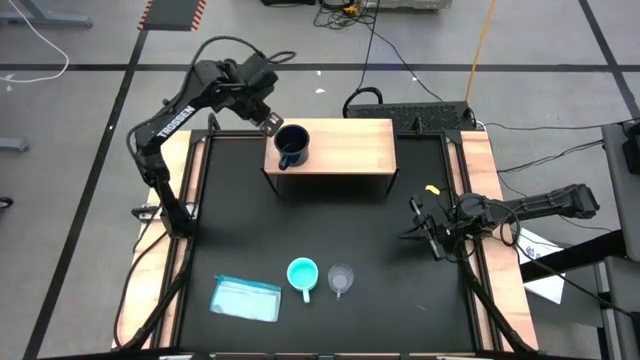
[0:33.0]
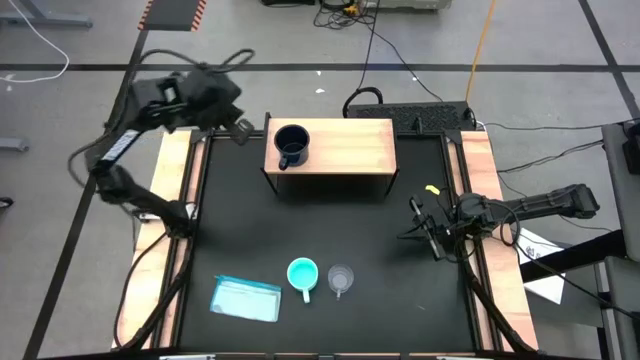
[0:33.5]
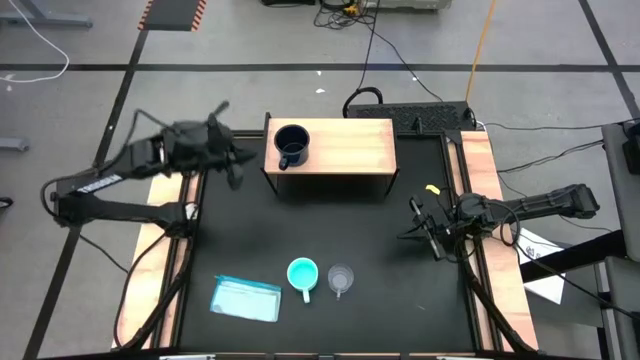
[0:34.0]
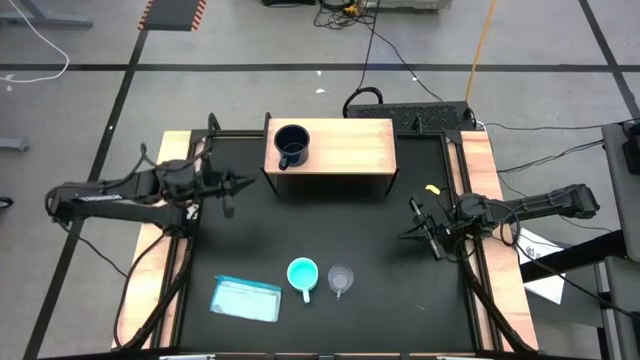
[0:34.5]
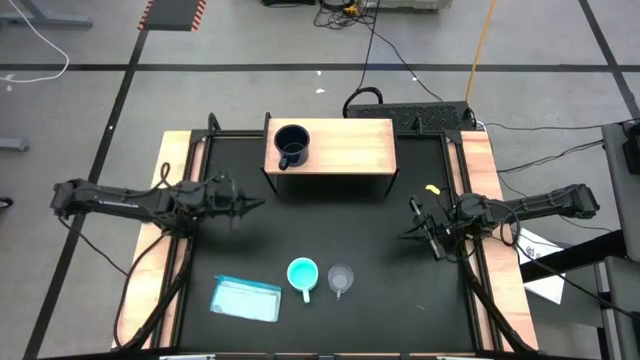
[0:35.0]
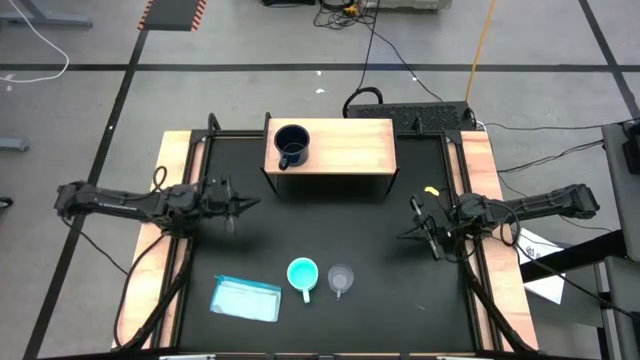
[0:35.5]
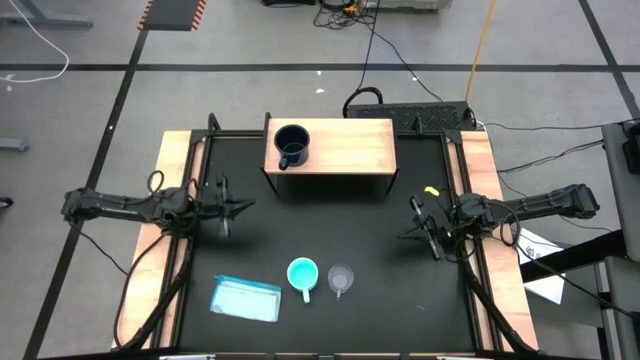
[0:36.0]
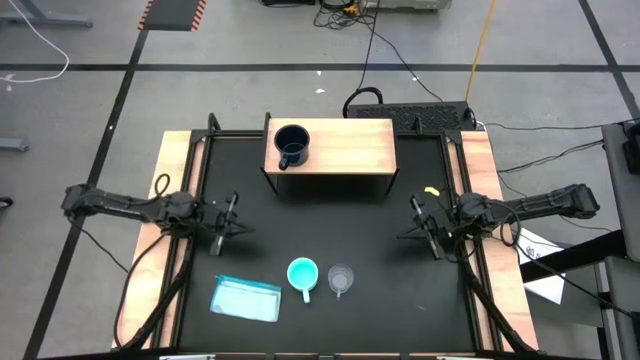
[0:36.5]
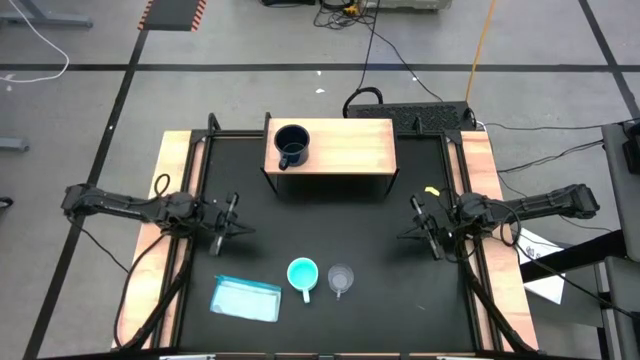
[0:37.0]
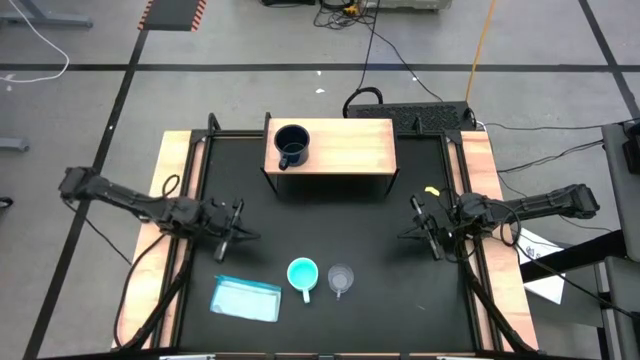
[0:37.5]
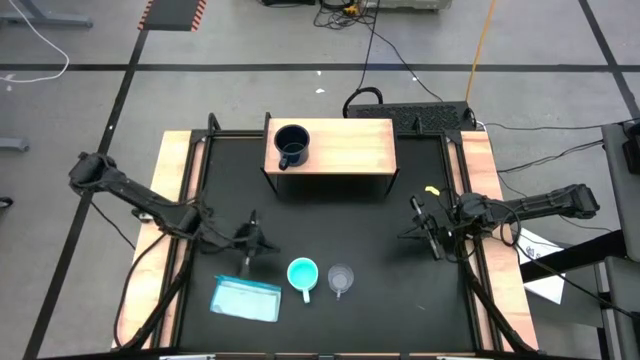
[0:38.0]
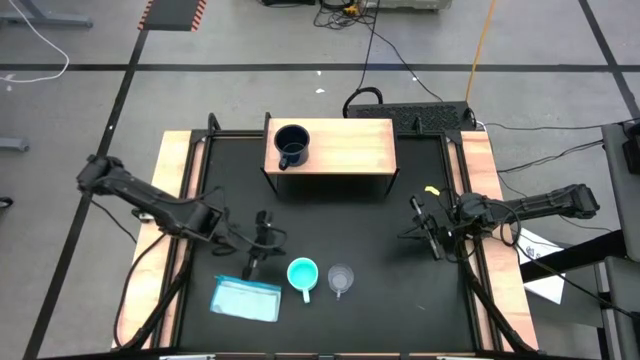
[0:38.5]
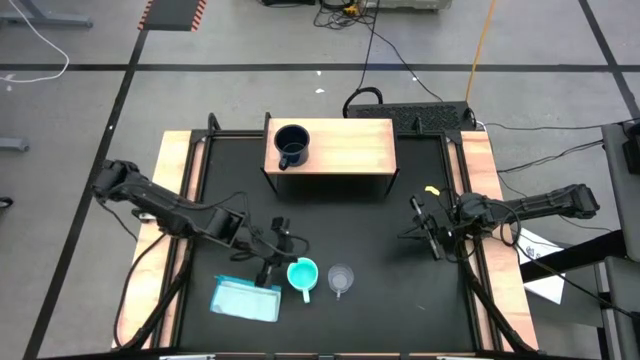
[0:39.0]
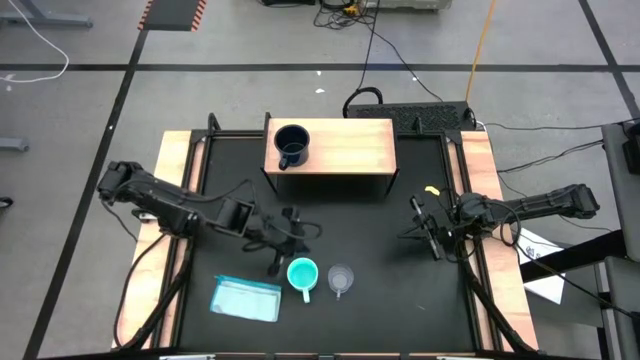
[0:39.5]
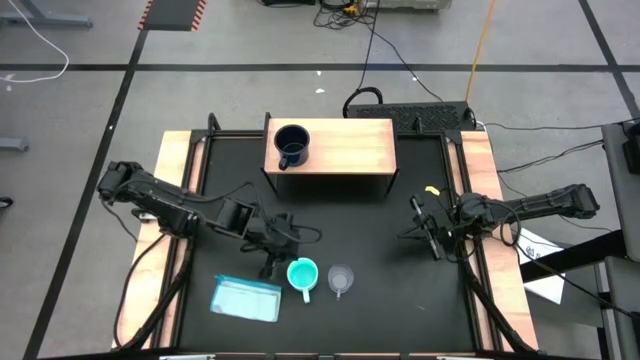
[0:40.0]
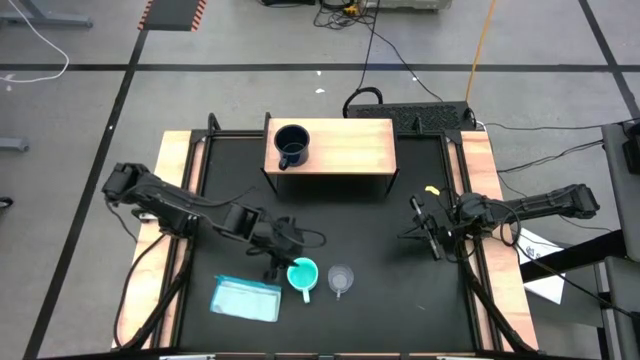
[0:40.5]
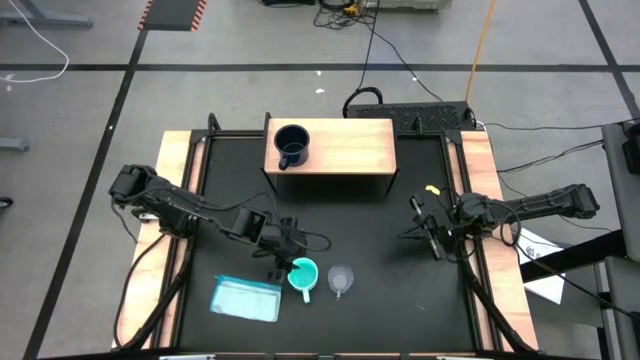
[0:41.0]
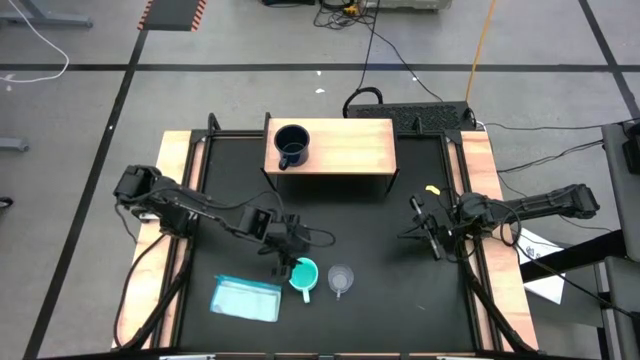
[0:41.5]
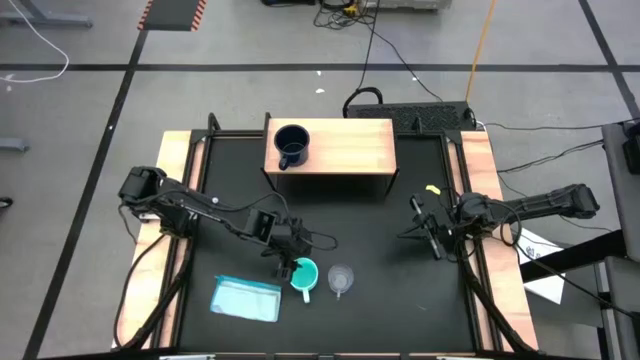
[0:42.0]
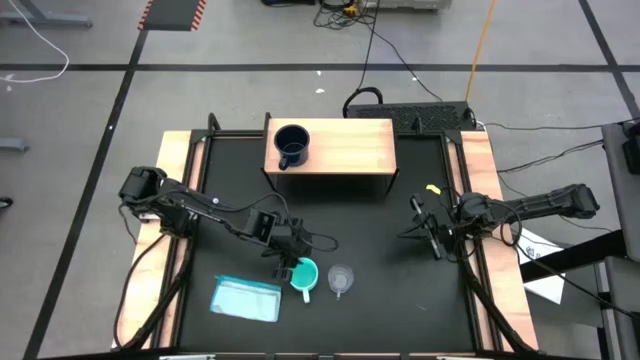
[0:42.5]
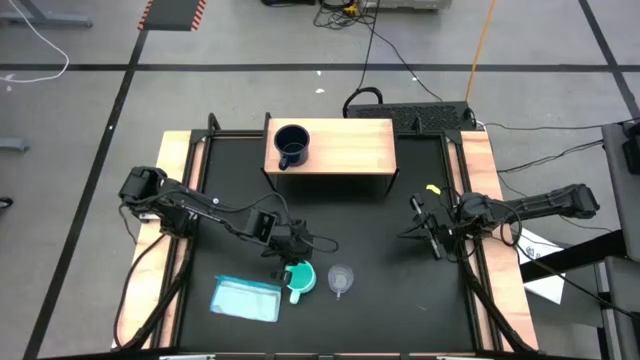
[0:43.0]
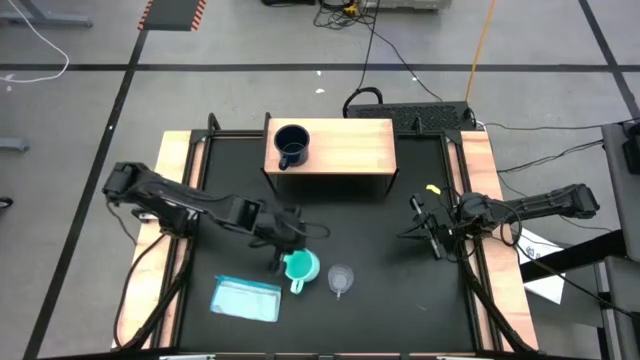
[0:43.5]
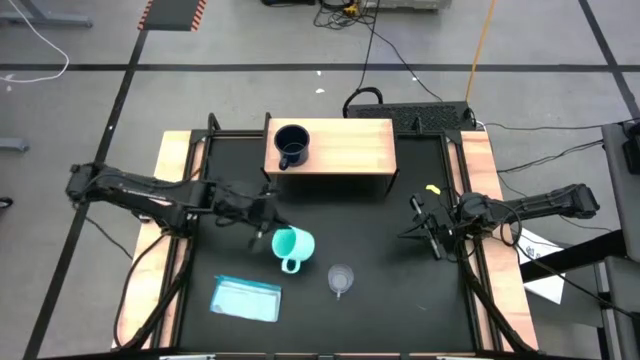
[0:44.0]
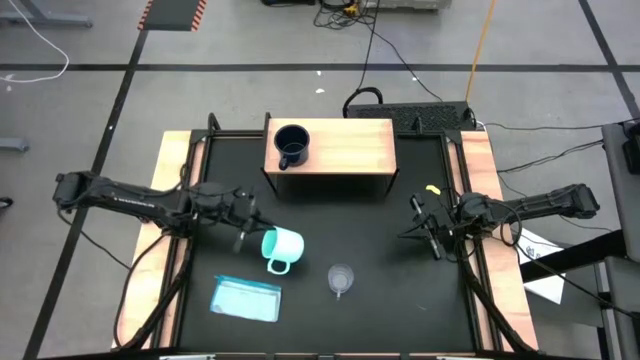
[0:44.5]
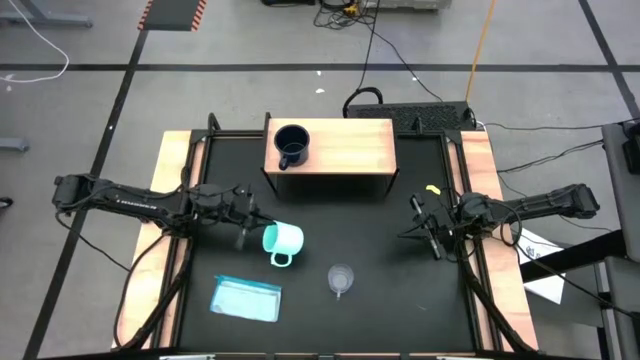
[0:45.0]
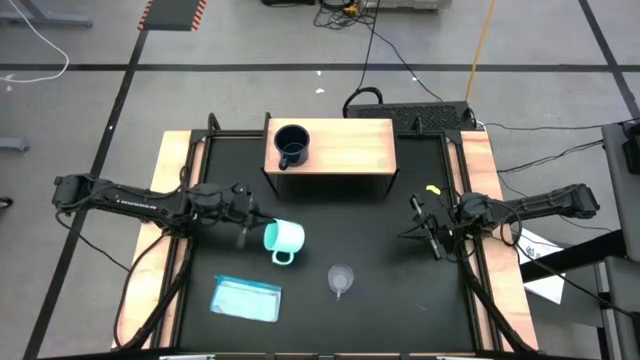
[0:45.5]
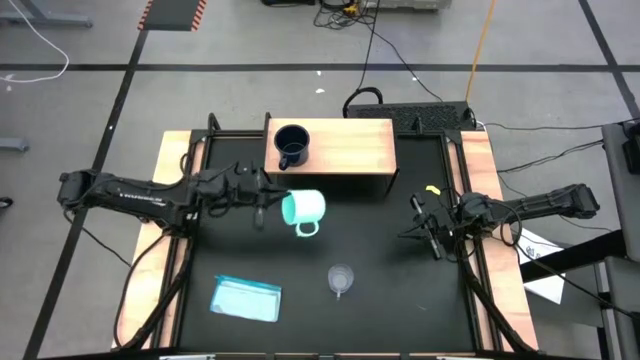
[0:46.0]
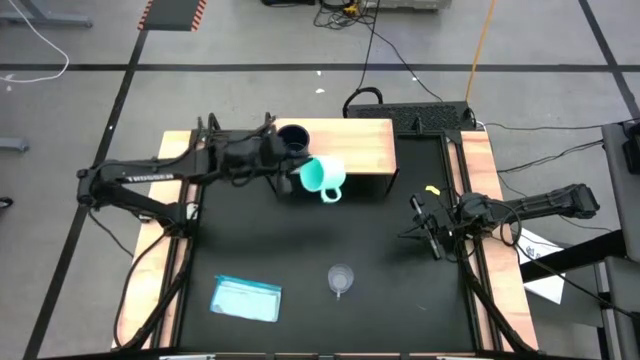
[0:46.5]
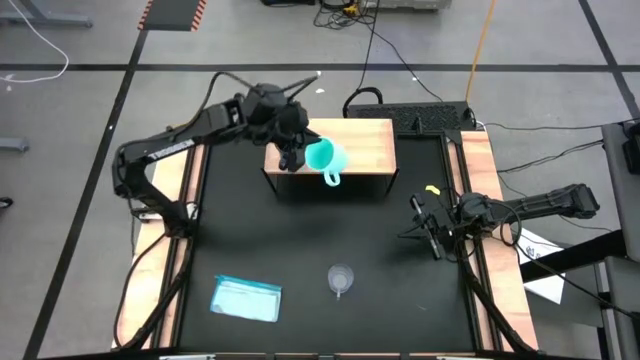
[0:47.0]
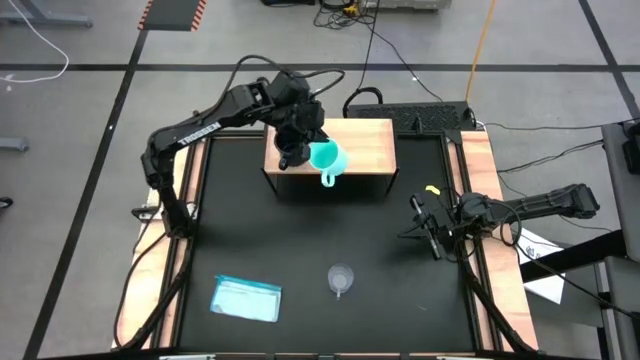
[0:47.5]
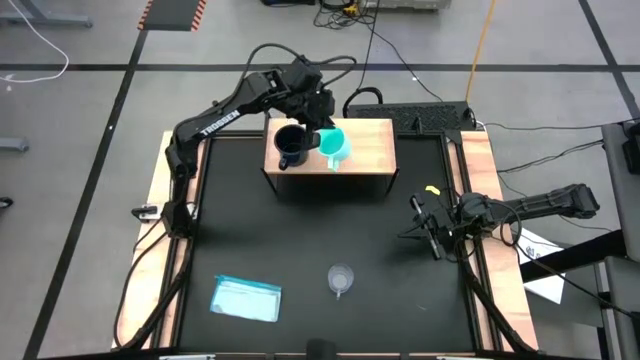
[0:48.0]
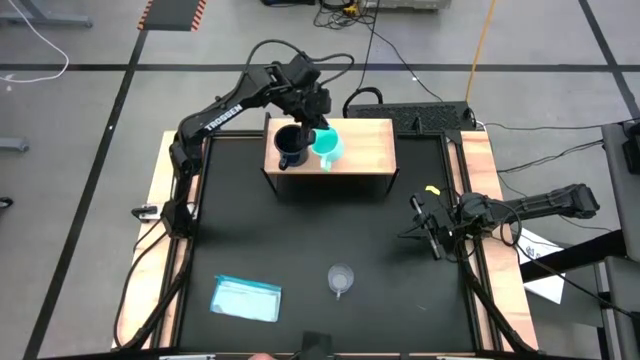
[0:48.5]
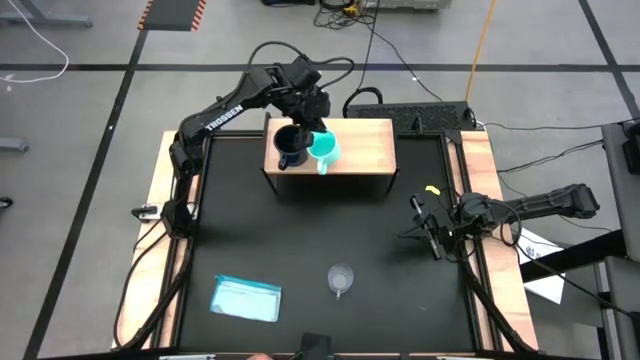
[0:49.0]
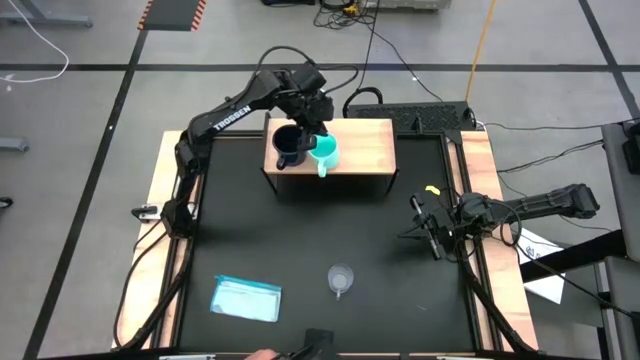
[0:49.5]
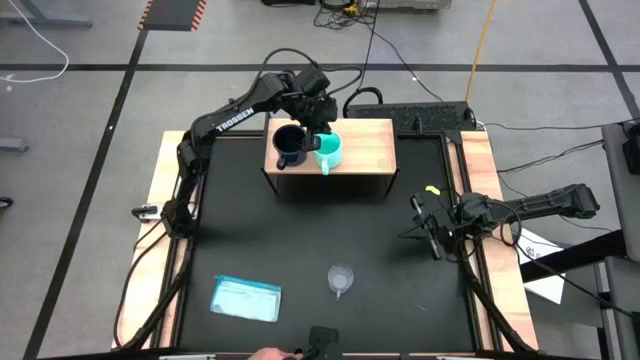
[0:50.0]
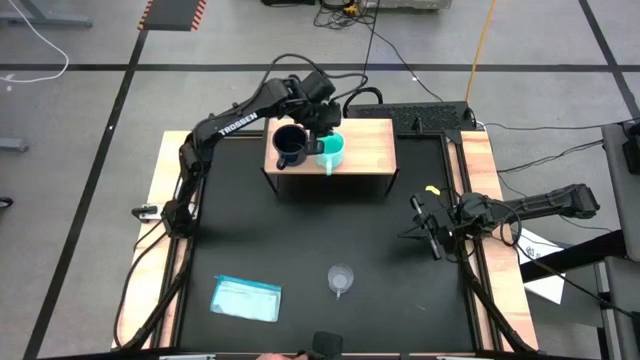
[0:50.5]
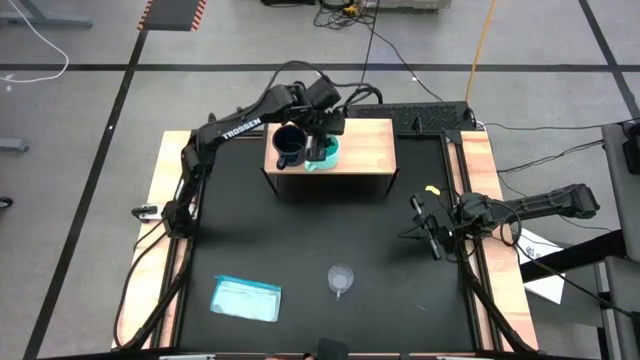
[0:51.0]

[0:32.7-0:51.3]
Task: Stack small to large cups/mugs on shelf
Put the light blue mug on the shelf
